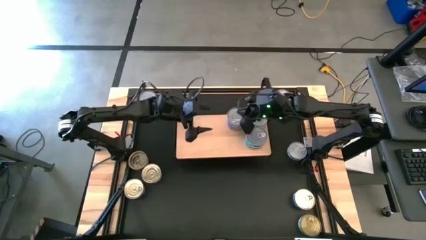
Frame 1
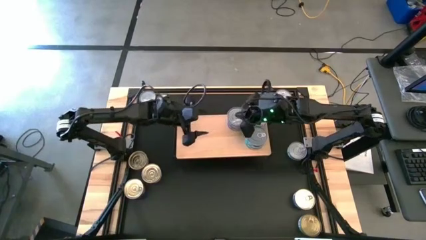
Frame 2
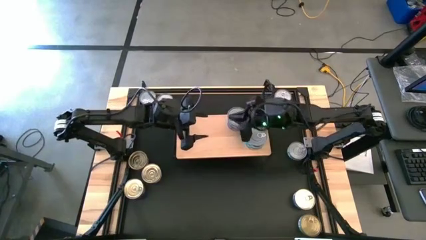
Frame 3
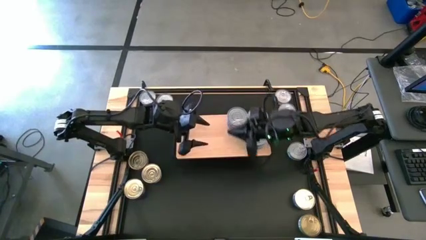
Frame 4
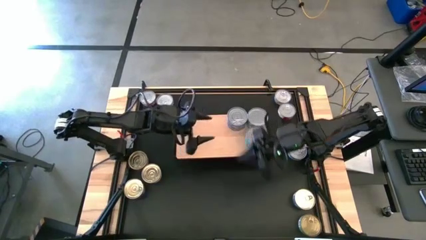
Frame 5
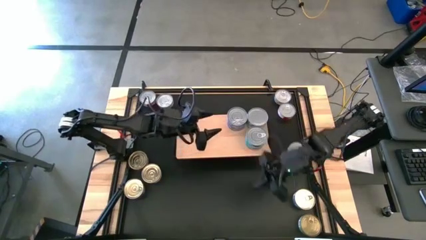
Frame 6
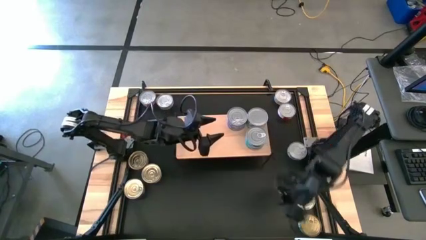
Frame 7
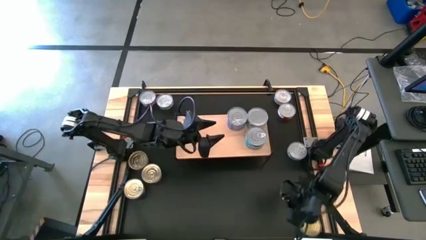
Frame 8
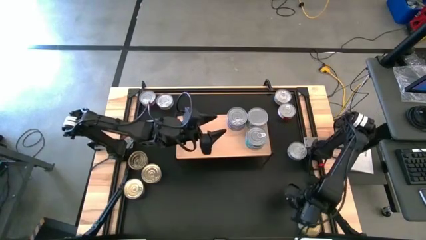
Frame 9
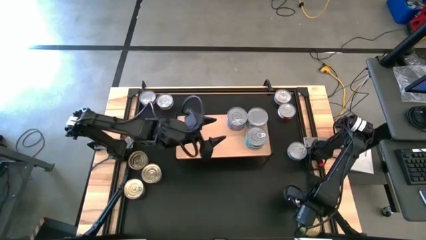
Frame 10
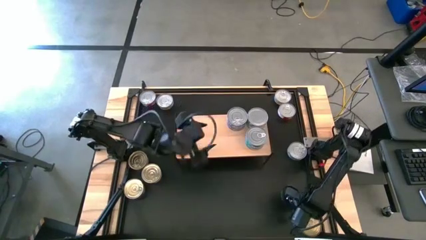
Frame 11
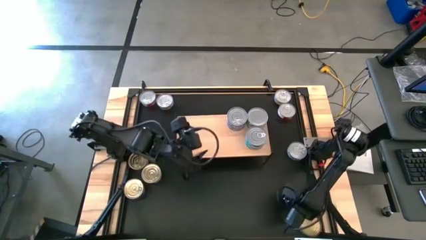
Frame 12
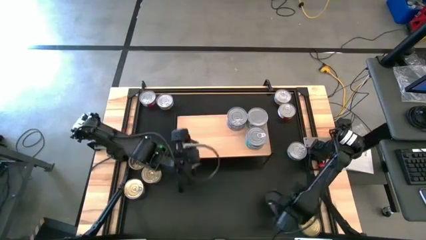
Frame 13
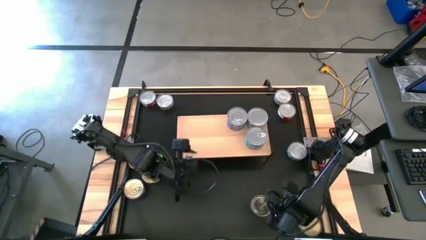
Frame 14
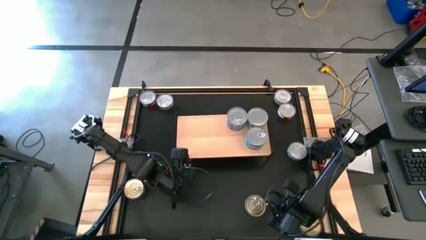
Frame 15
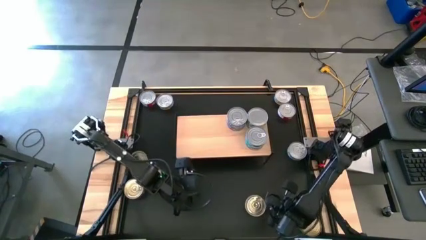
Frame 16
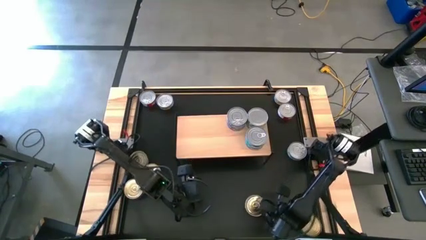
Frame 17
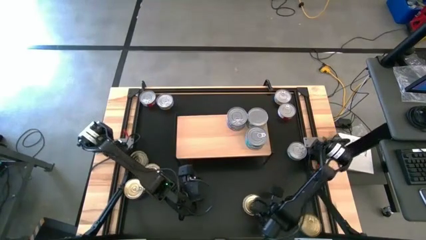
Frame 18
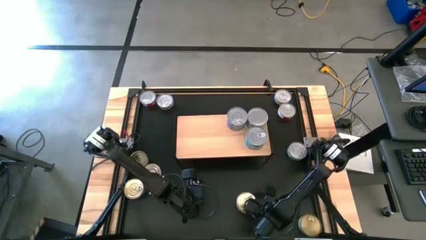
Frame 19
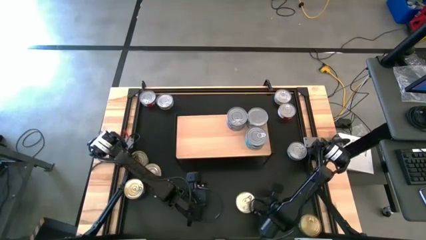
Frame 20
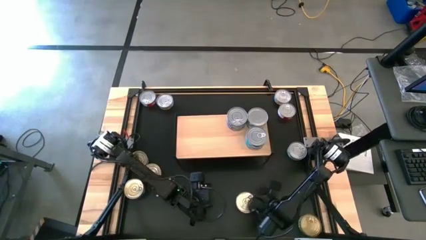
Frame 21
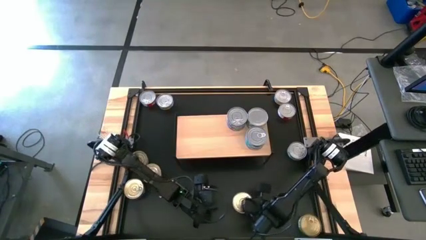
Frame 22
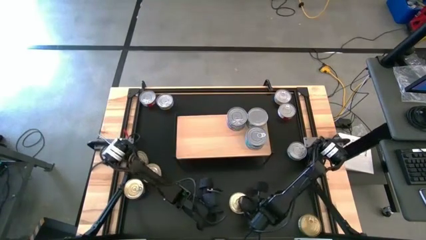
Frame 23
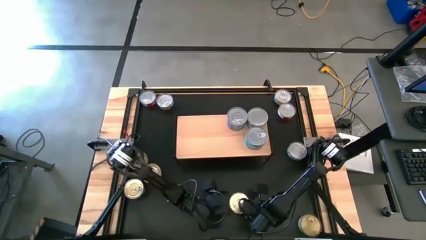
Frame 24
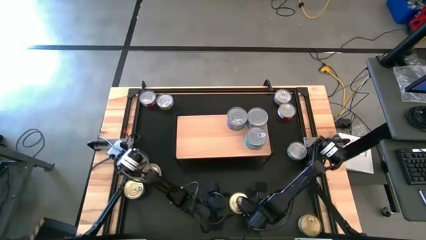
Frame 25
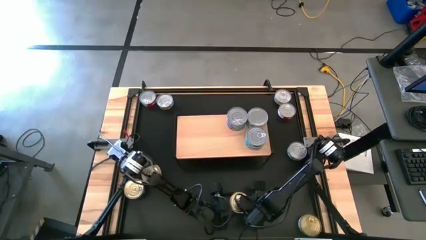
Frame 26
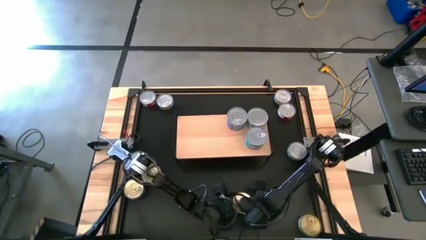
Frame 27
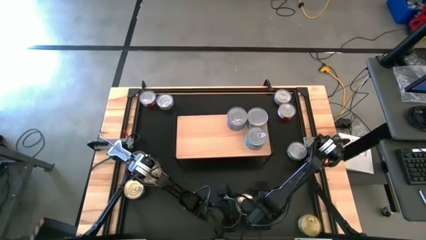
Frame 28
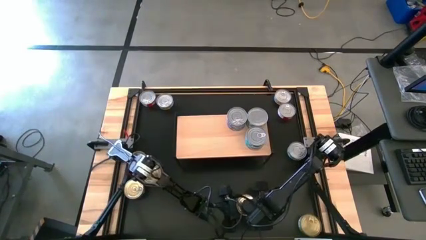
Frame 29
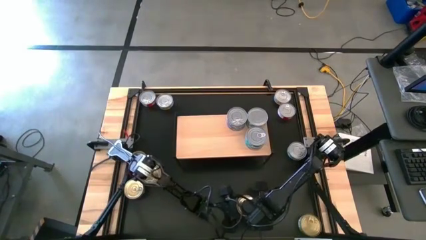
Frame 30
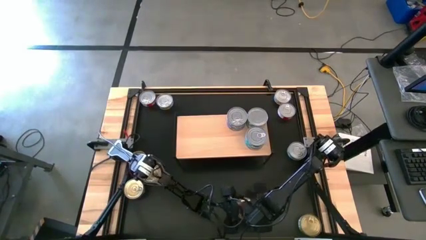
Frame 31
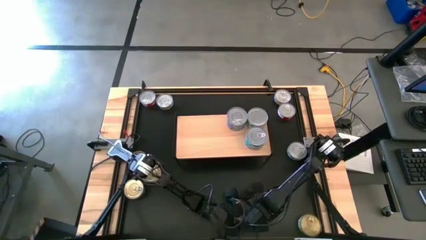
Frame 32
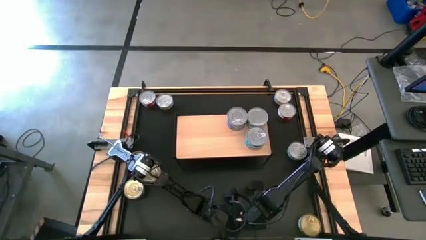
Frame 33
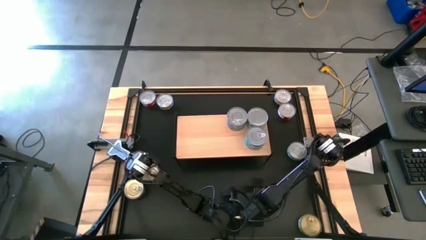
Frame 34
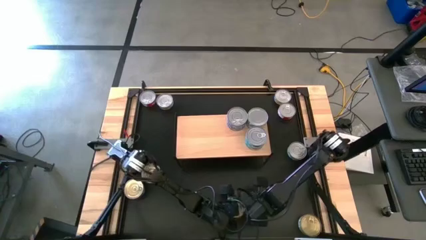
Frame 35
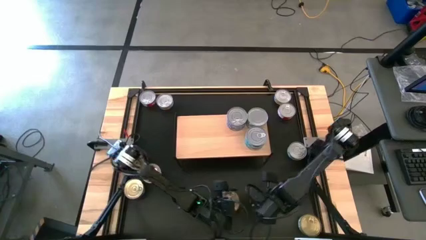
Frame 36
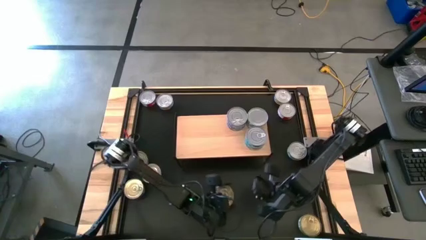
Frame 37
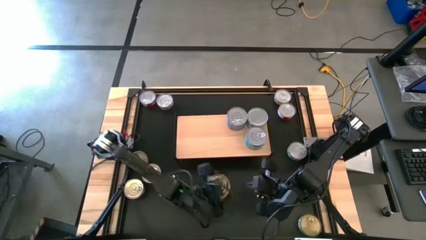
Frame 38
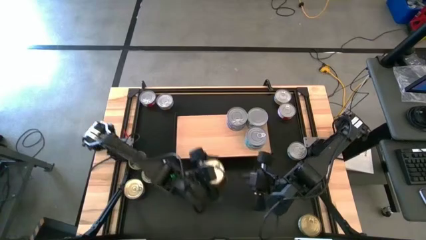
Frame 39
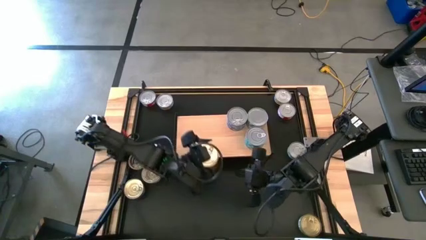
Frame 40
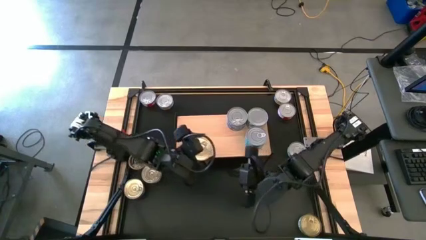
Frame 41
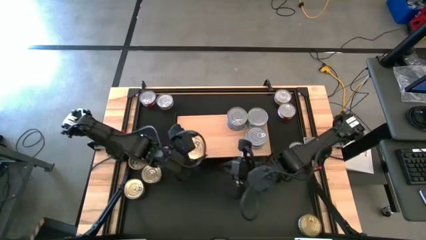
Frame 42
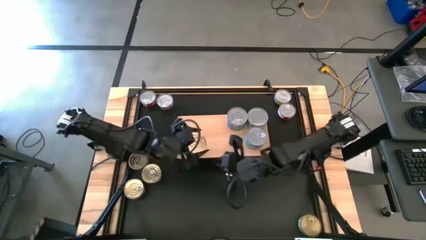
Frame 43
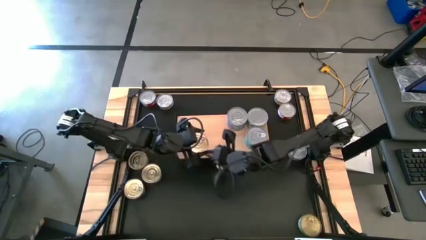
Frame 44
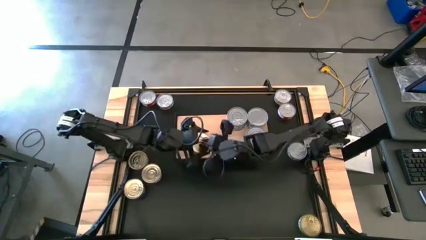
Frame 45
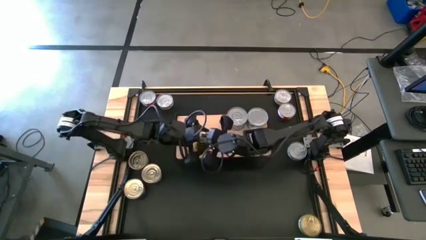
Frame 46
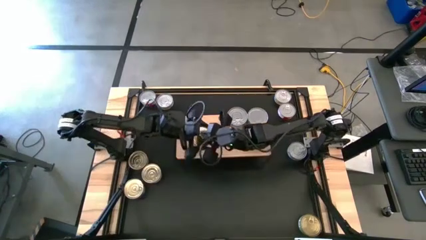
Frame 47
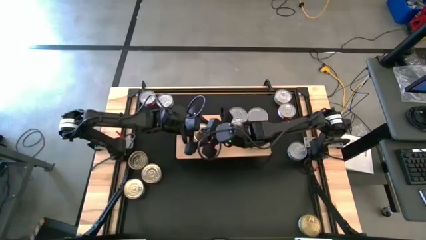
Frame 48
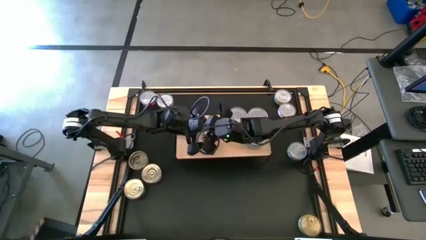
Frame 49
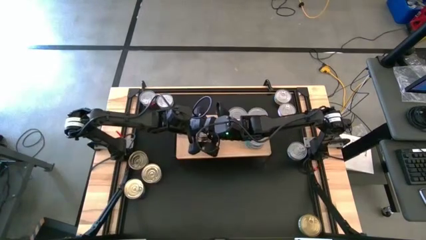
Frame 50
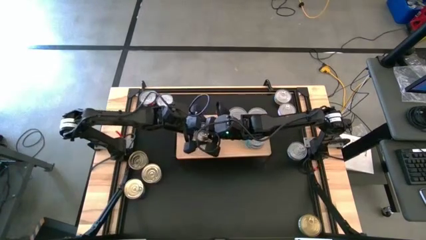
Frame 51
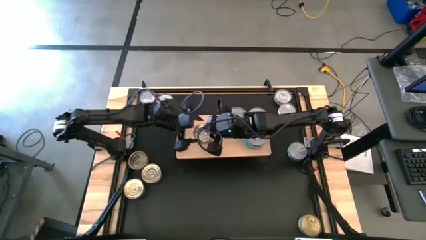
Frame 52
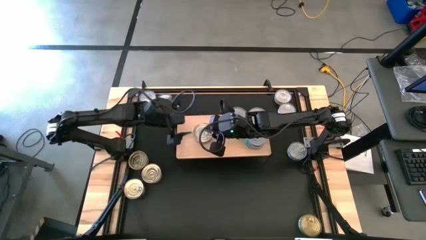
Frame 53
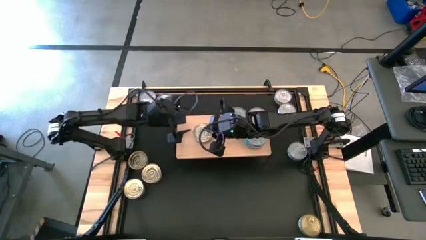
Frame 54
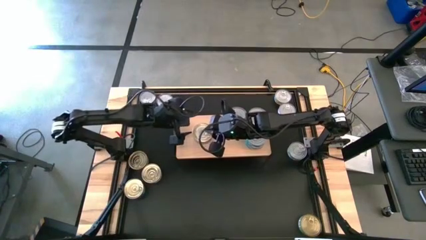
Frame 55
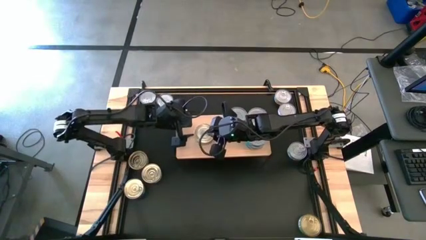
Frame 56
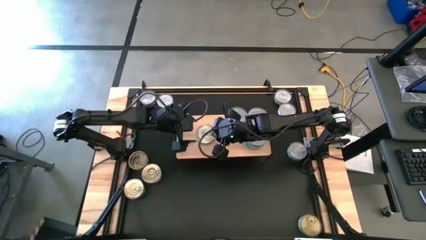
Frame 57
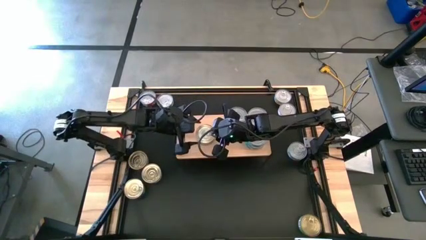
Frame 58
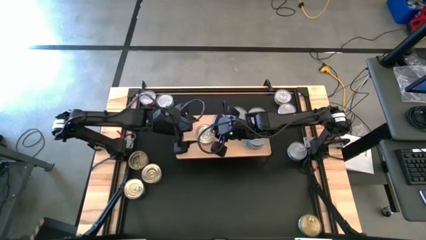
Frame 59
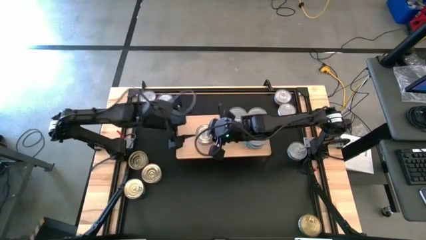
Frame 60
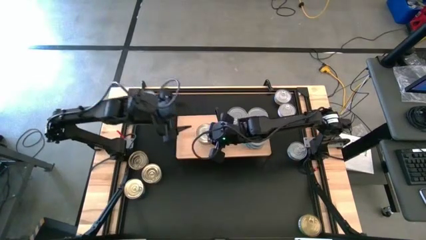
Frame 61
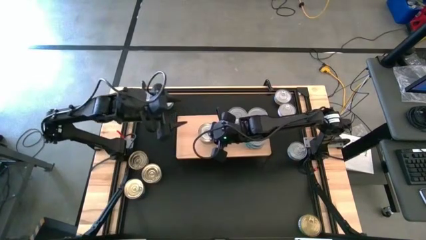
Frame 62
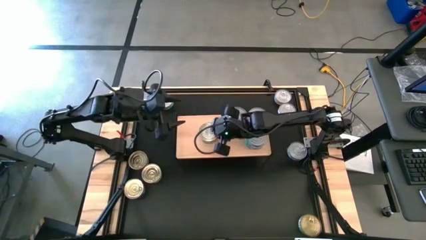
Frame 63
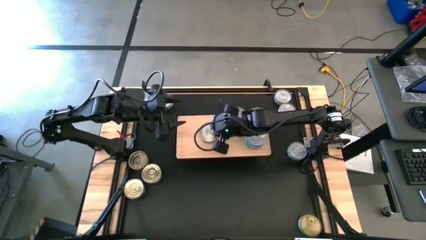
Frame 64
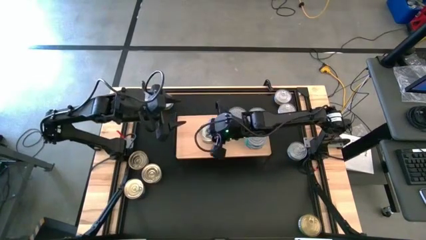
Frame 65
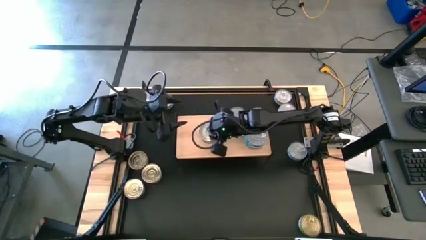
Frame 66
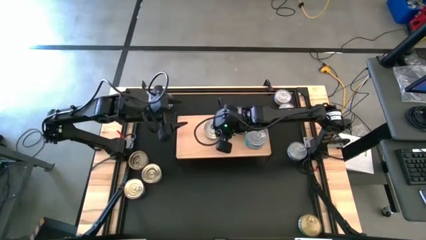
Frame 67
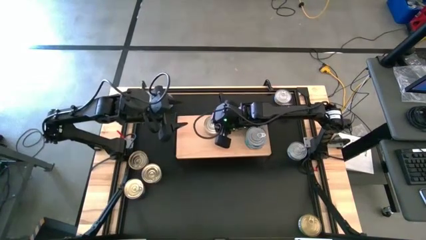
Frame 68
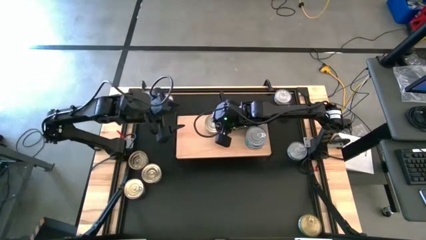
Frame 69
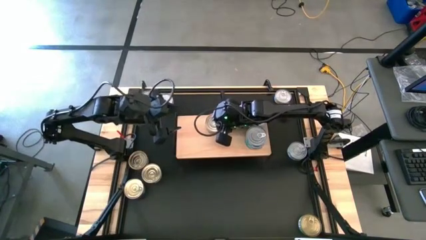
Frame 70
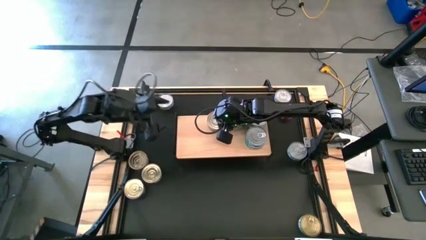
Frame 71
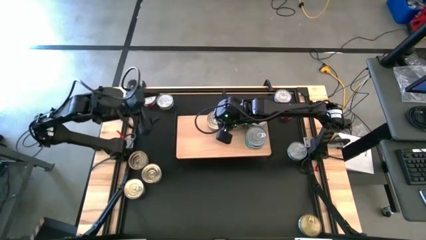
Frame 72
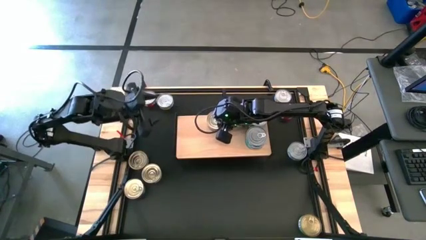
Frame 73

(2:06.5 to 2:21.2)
Task: Stack canned seafood by type on shelf
Put the blue pink tuna can on the shelf

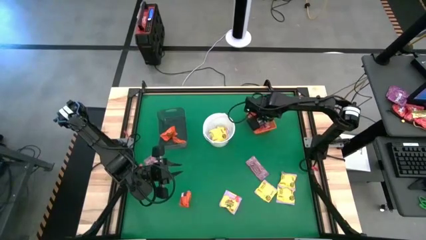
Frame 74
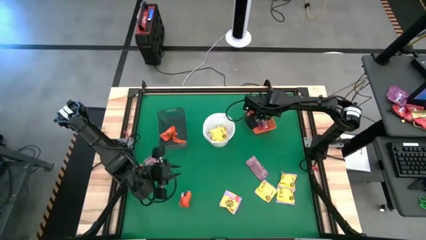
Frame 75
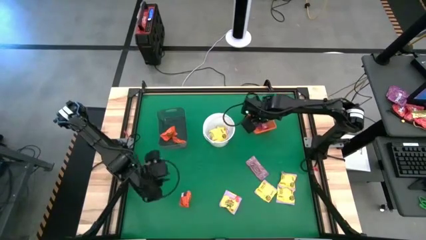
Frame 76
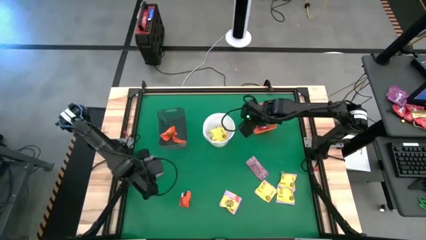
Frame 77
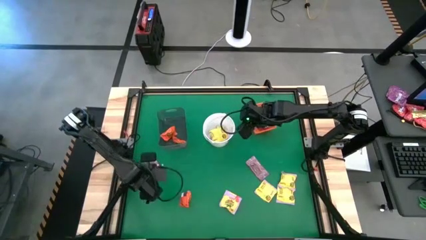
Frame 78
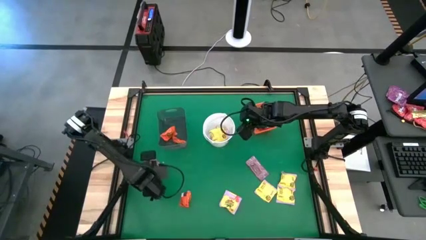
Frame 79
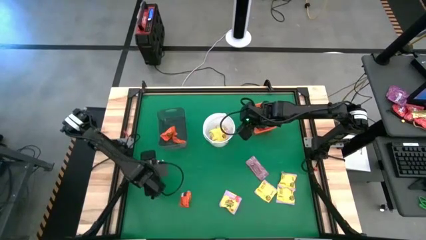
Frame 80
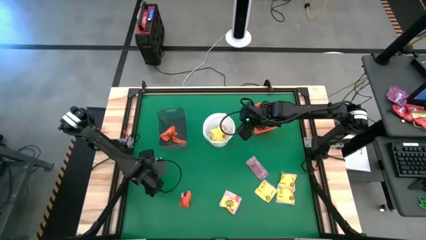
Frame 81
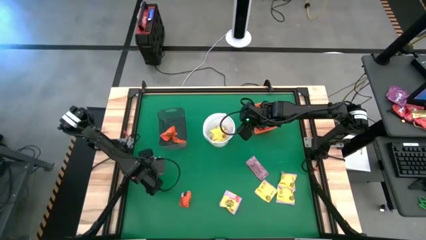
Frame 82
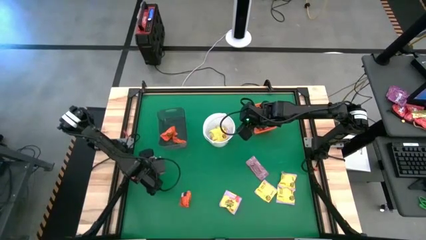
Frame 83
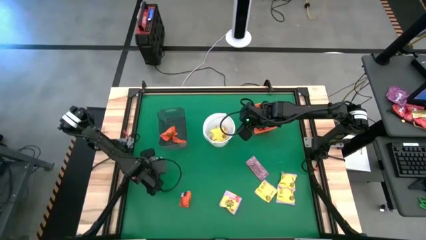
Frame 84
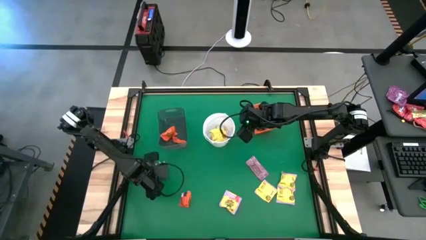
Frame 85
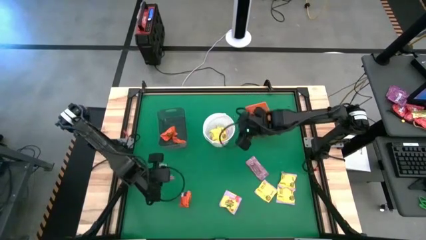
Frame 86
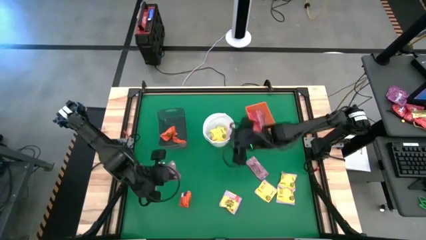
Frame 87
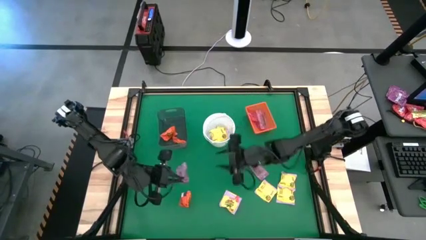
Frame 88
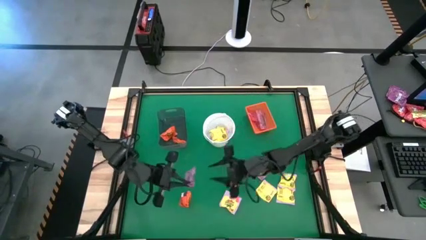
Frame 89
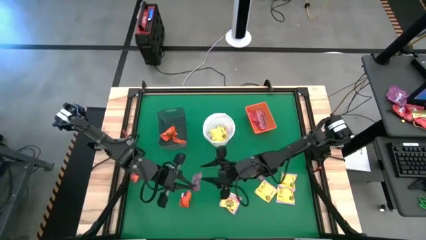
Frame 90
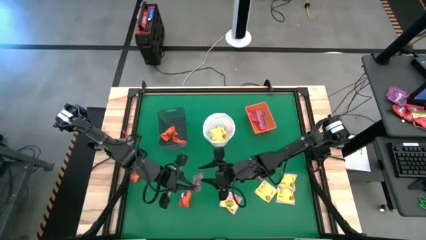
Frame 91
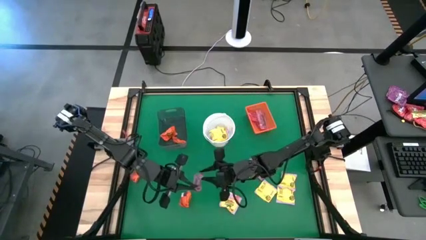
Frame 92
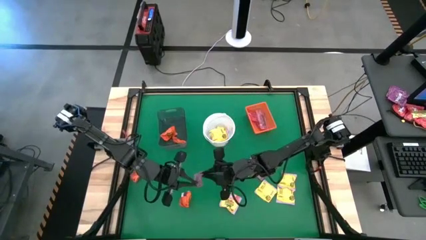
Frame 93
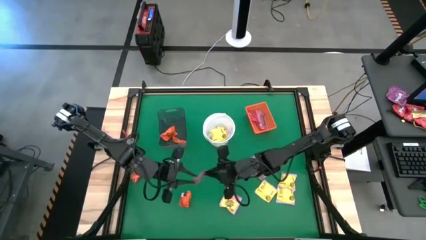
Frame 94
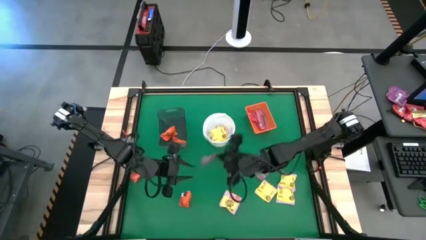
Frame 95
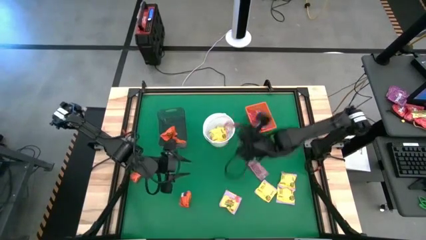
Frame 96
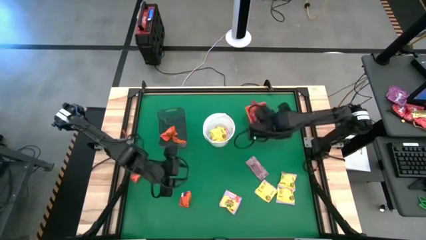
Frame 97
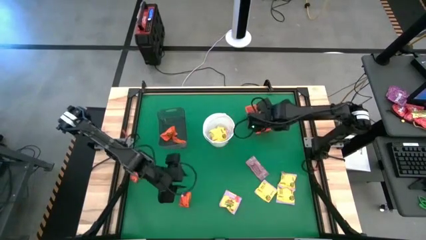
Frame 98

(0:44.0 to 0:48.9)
Task: Sort candy by brand, put in halloween buckets
Put the red candy into the orange bin
